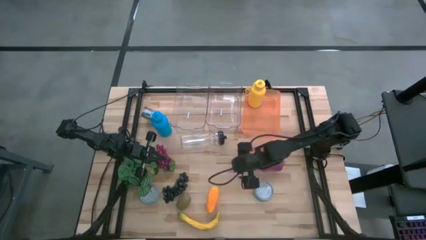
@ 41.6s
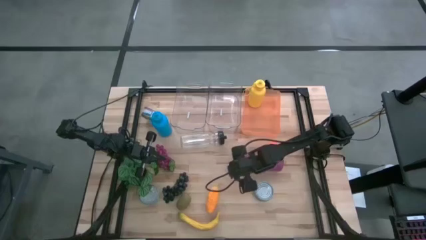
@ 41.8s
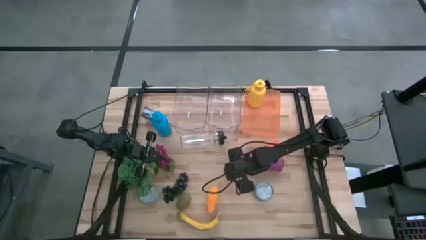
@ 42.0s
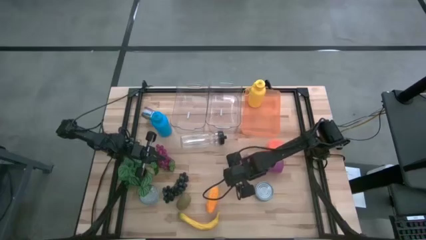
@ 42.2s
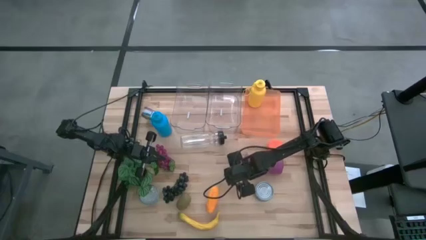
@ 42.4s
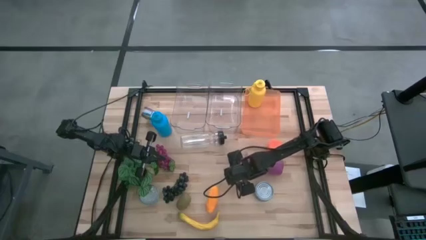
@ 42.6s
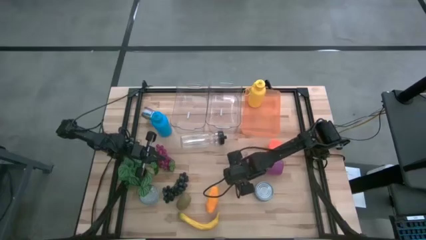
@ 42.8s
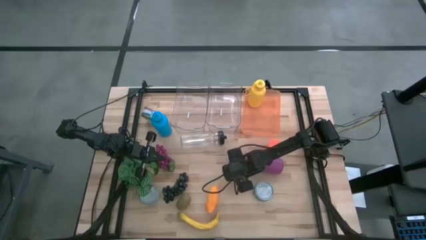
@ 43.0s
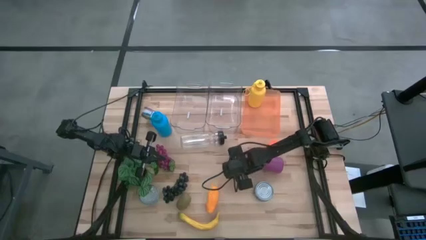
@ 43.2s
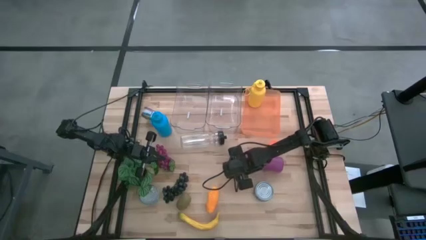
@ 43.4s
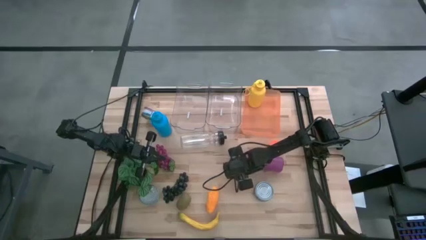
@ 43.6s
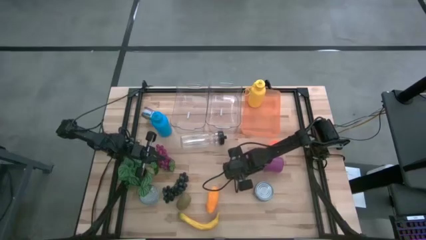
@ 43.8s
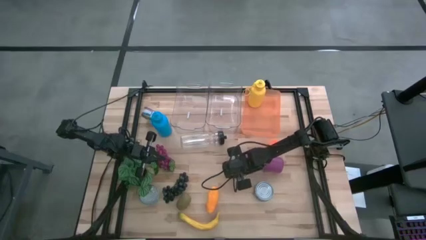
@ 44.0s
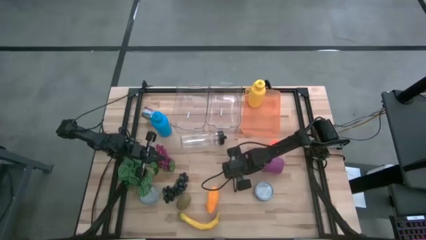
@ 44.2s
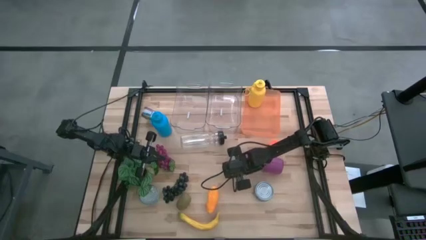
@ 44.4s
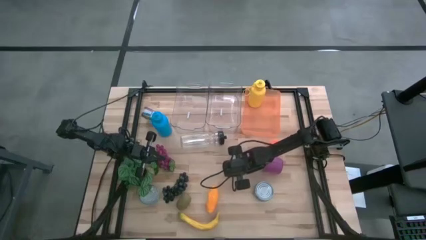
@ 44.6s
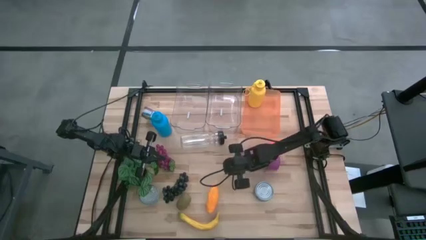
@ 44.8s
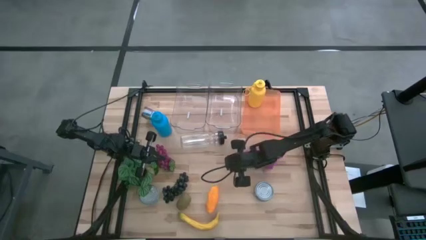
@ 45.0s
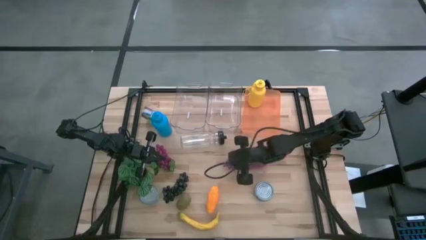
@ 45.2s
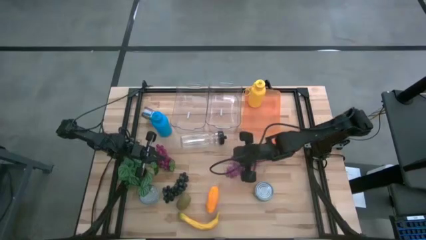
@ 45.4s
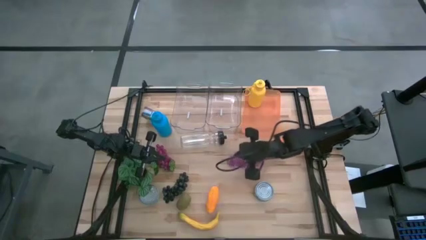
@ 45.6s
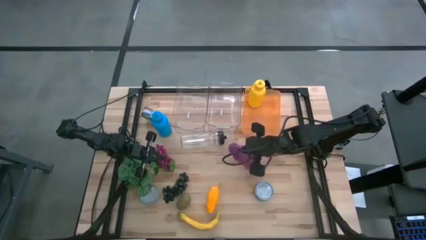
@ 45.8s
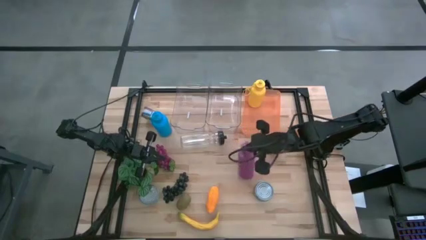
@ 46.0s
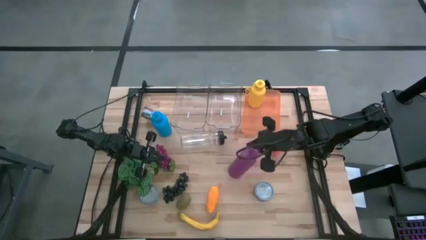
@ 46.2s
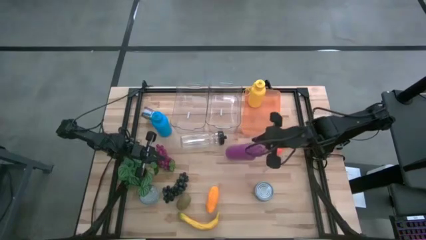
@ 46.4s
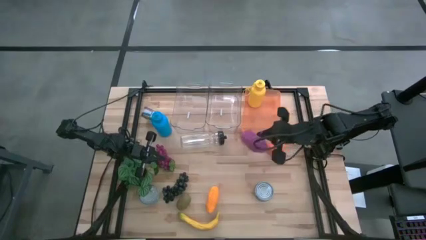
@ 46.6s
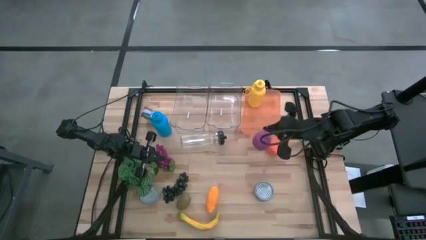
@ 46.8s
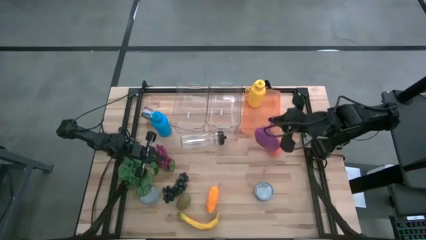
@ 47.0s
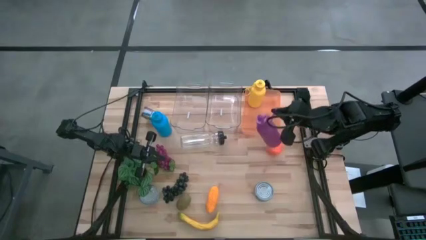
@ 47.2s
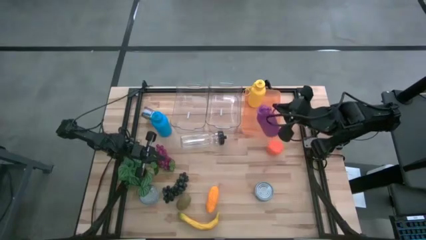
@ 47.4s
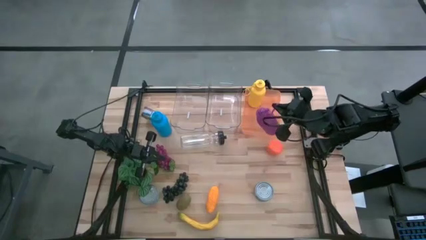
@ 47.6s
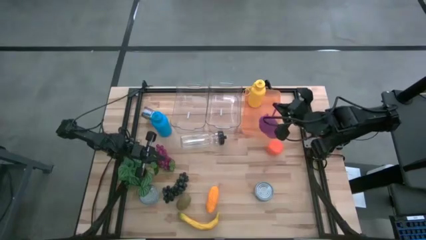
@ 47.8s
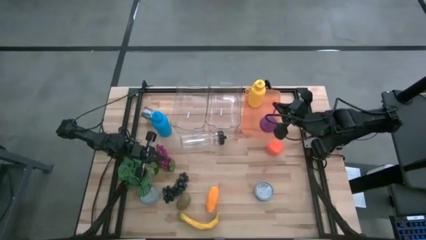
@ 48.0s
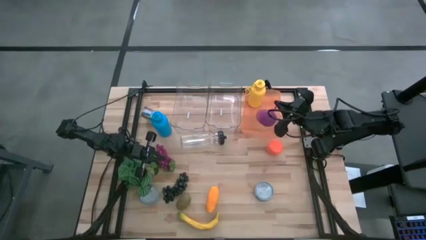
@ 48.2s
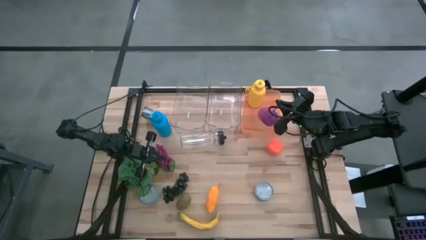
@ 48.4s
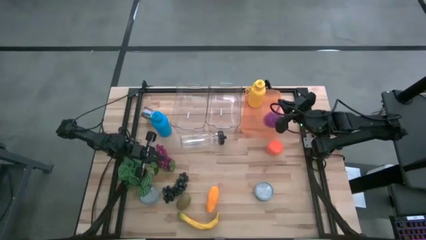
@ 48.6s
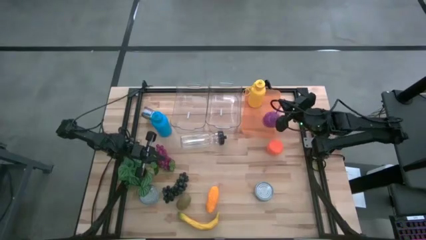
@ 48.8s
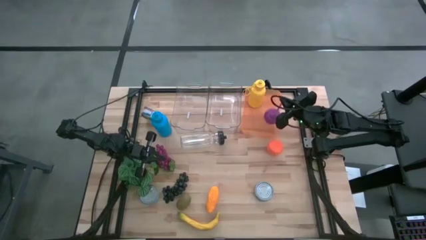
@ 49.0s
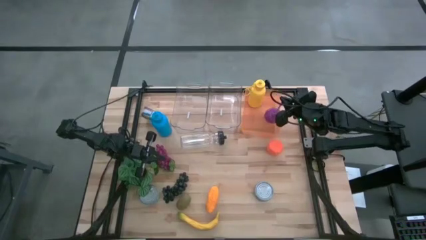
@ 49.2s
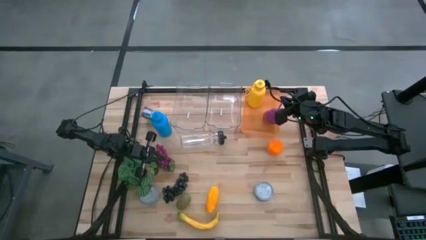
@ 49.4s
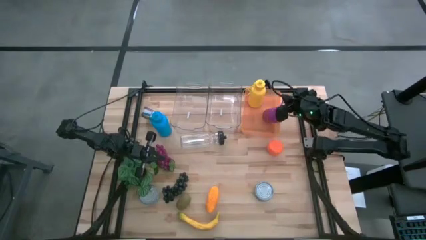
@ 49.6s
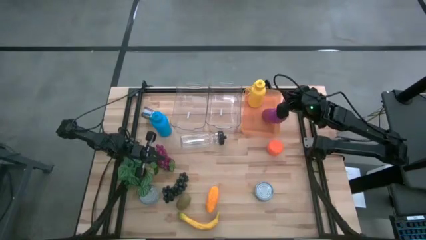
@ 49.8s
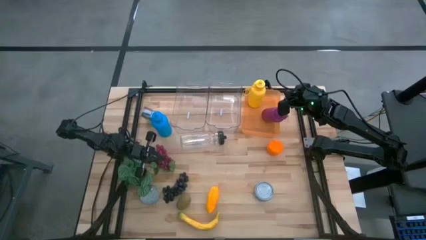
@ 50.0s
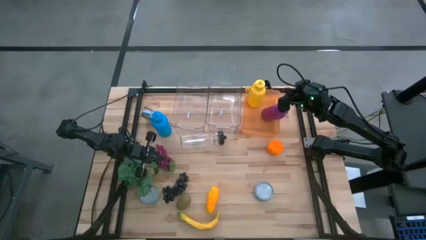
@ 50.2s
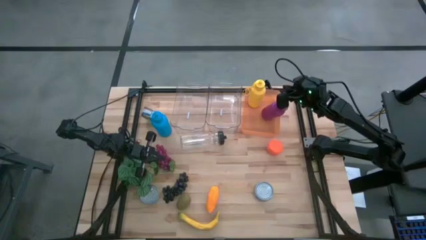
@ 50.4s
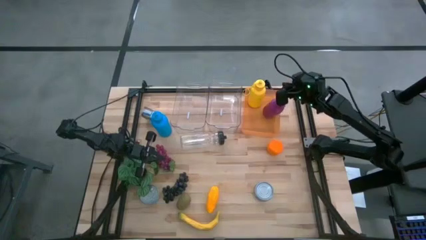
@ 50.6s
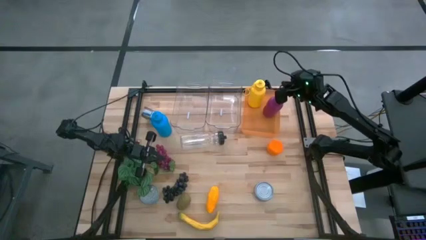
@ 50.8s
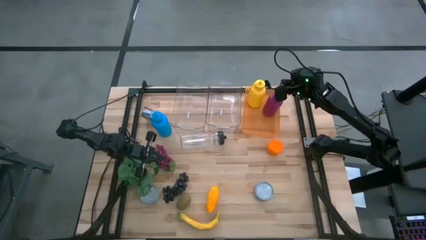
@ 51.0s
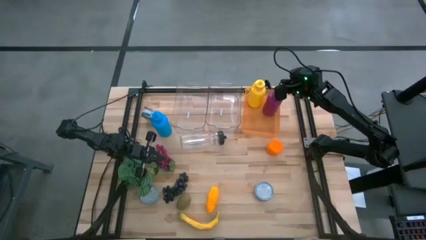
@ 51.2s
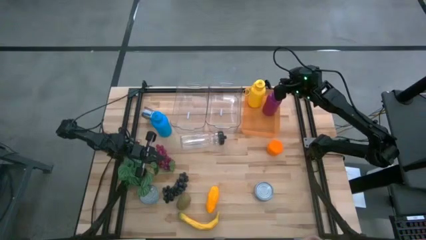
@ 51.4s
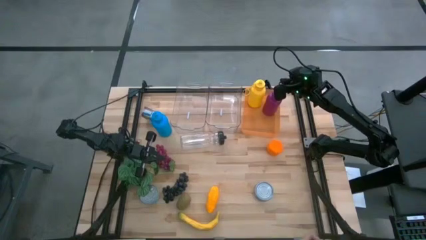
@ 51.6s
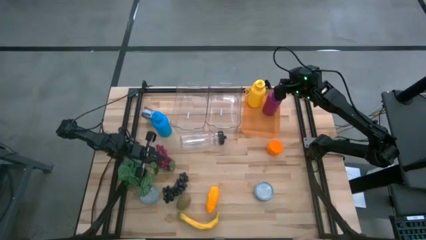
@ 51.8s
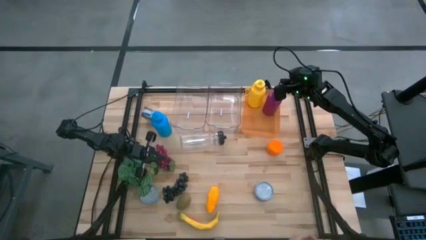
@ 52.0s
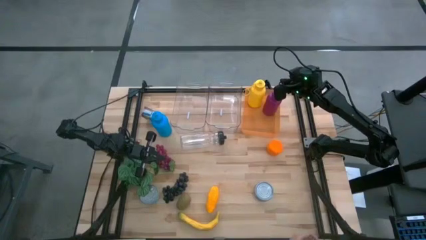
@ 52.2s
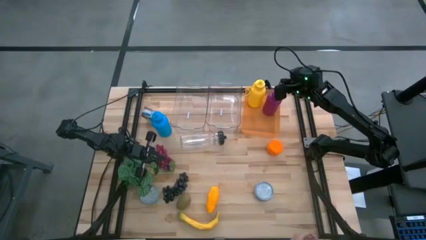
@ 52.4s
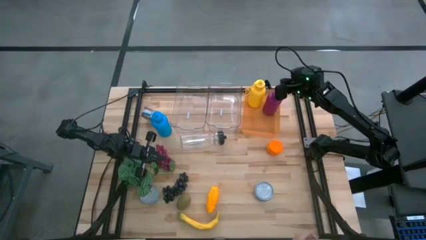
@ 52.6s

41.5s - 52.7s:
Task: Pick & Place Food Item
Put the purple water bottle into the orange bin
